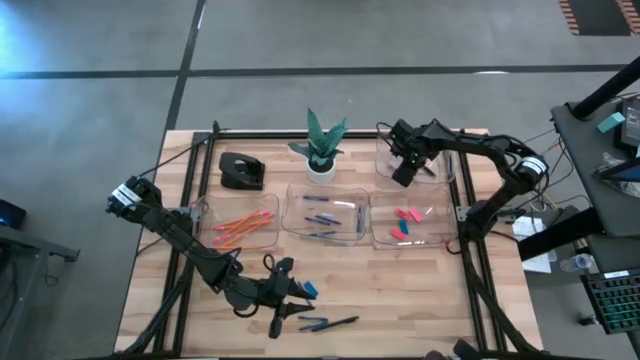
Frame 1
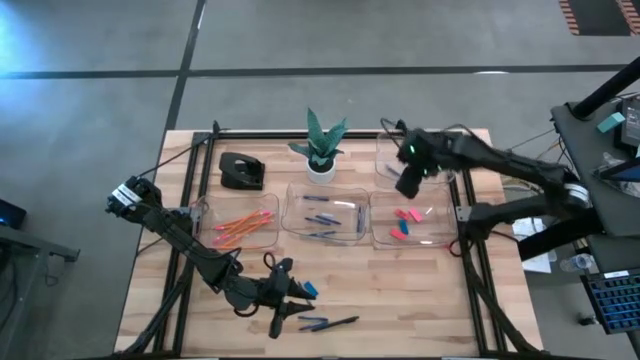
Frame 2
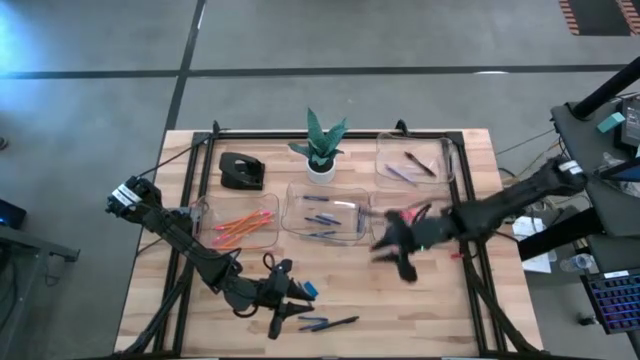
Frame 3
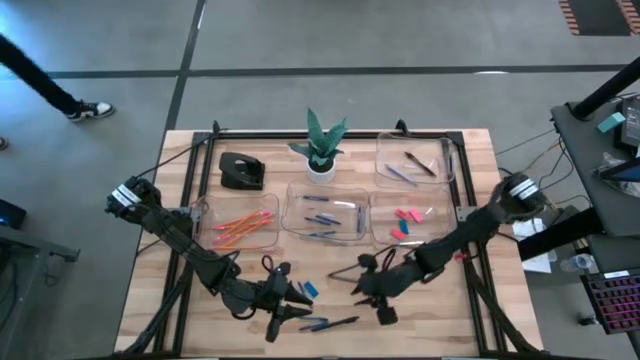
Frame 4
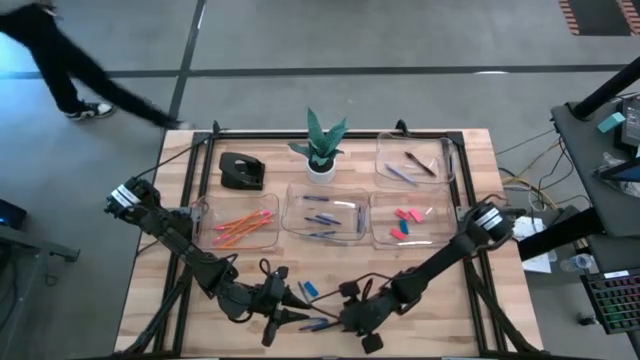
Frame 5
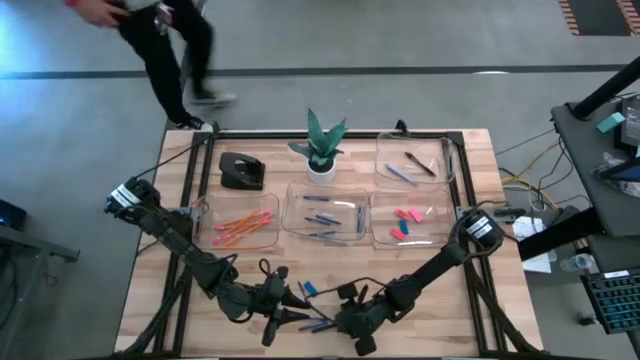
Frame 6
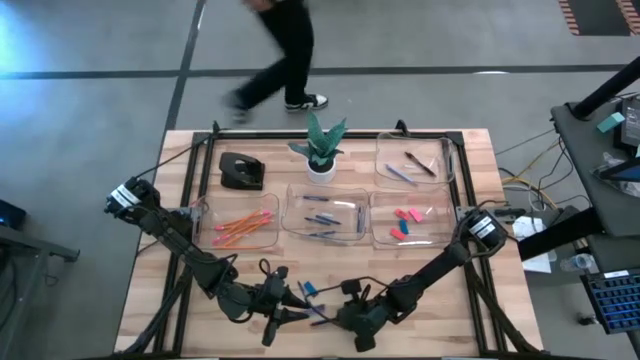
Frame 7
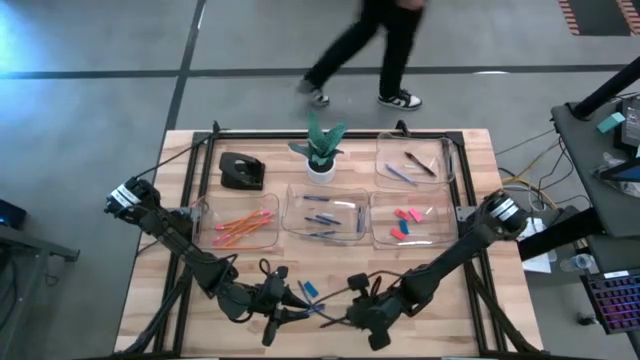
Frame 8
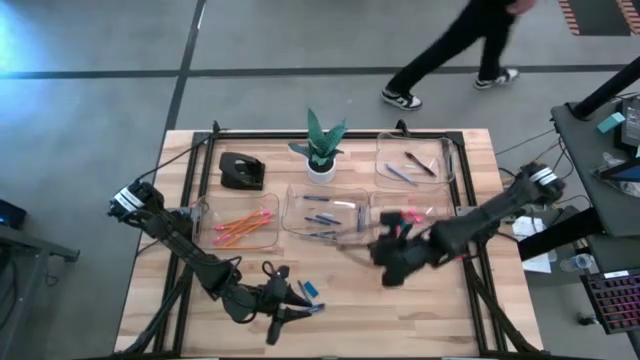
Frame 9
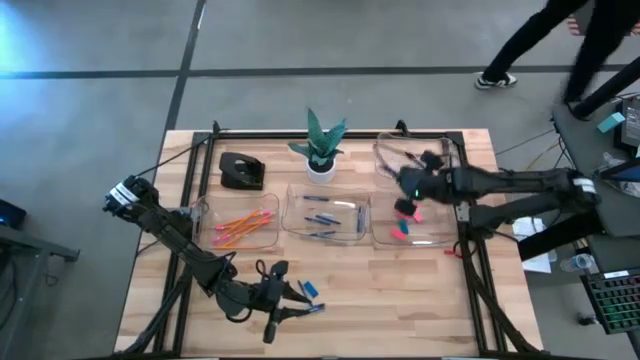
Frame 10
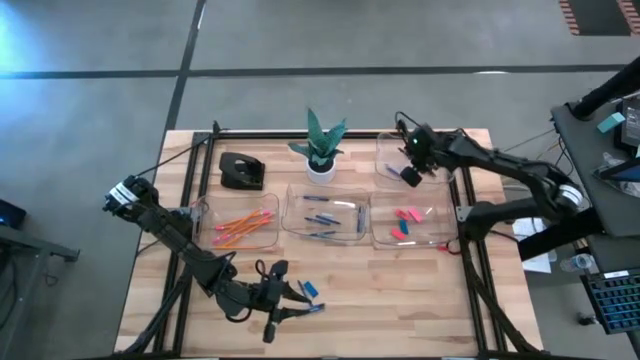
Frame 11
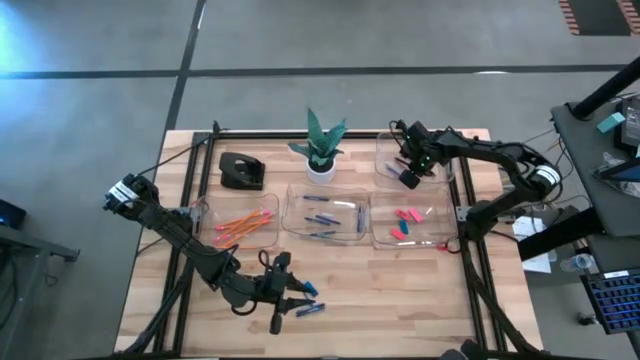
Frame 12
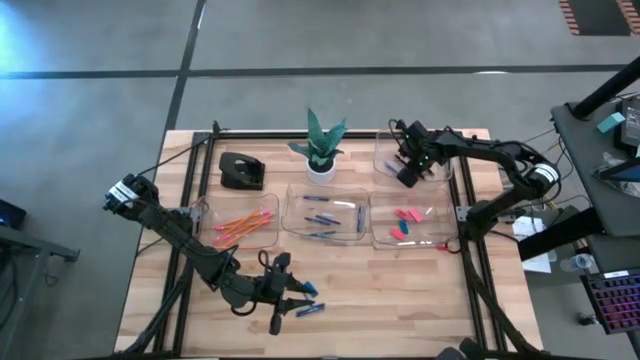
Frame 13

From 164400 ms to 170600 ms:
Task: Sort crayons/erasers/pens/pencils in bins
Put the black pen into the top right transparent bin

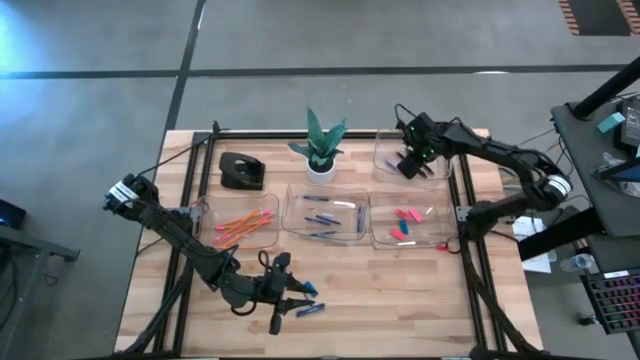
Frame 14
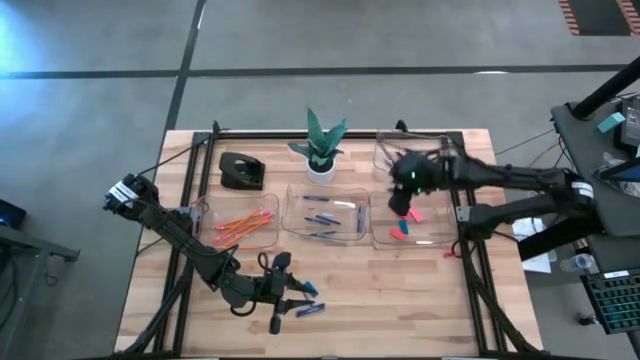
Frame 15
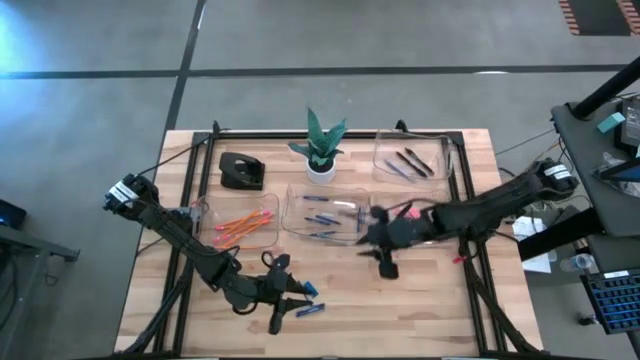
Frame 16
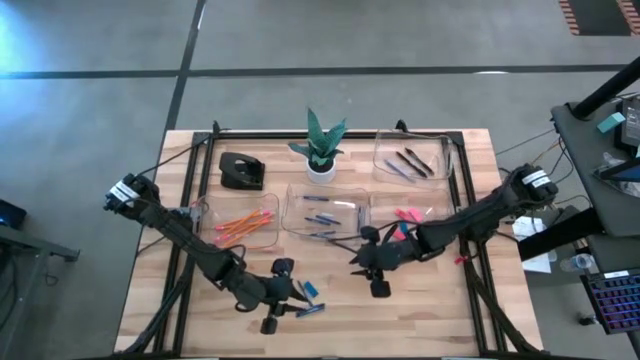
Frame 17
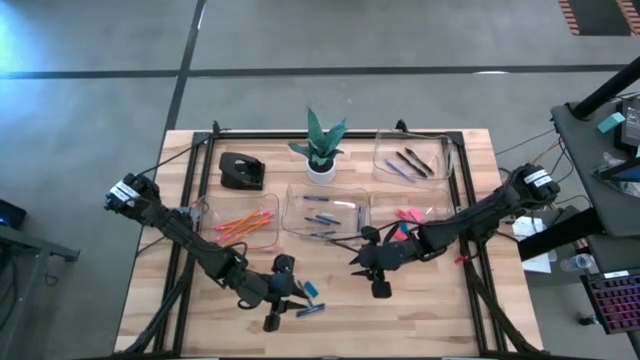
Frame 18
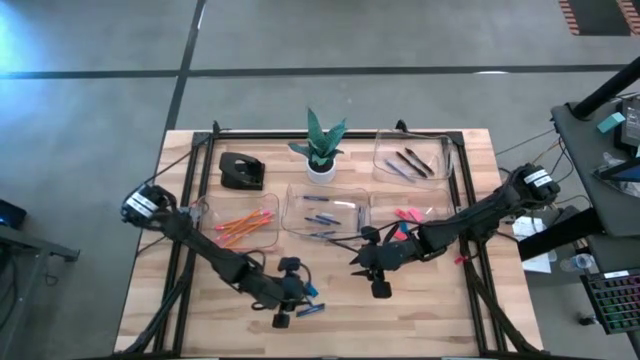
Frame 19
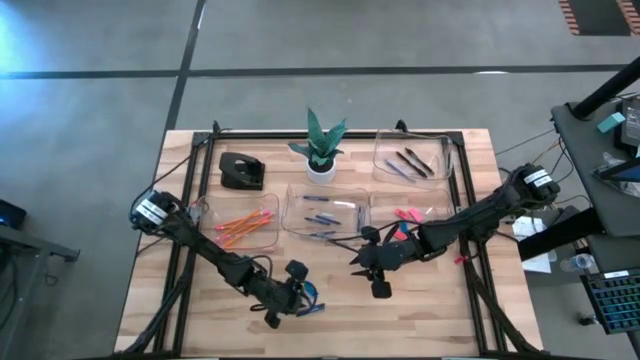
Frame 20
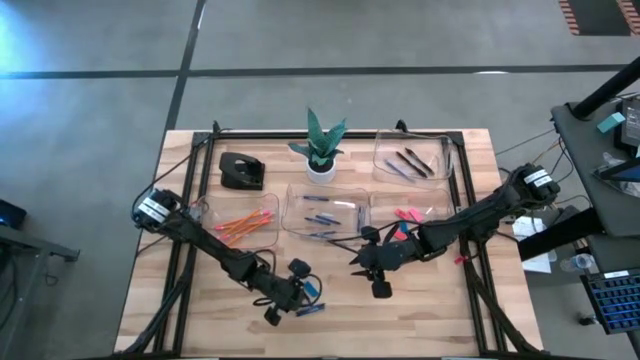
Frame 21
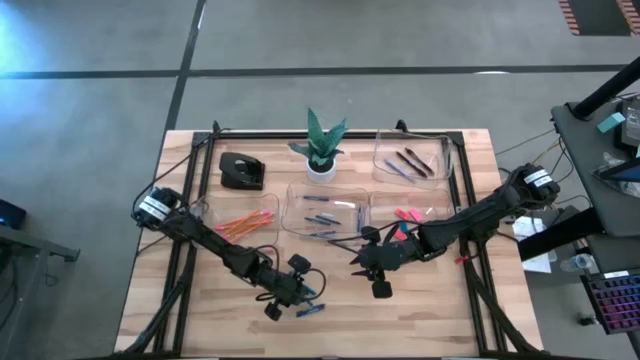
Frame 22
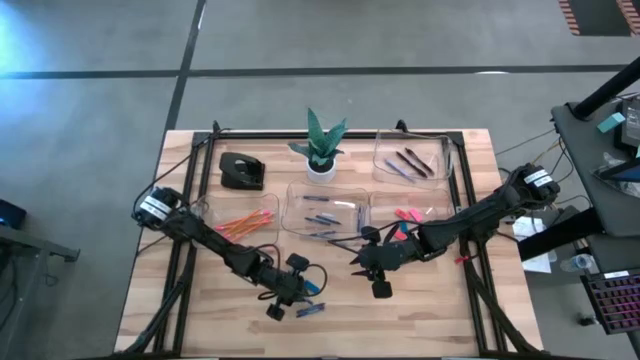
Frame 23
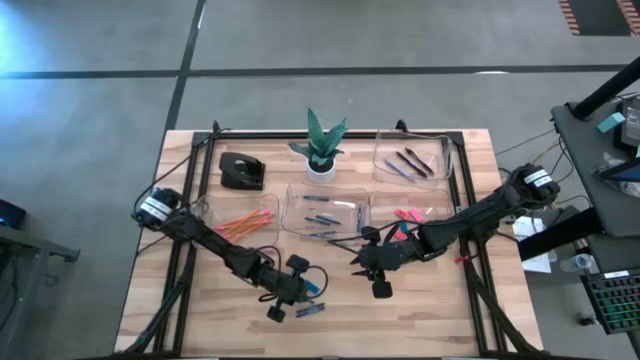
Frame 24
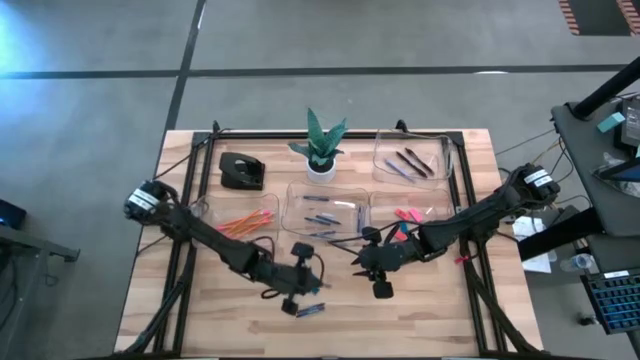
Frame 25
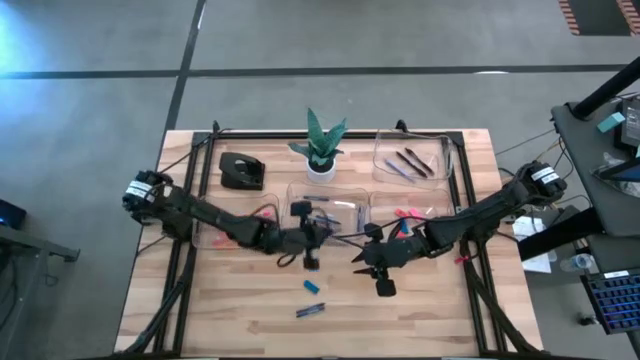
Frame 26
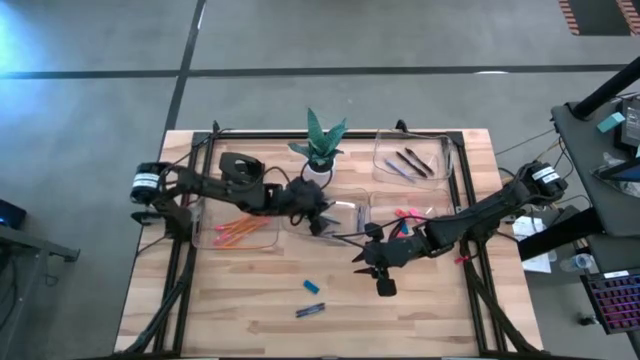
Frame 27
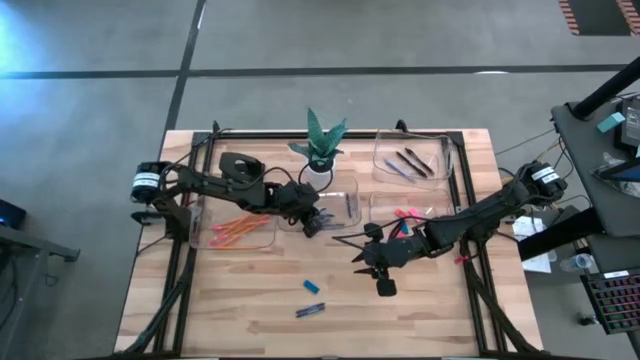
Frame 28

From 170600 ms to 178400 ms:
Put the blue crayon into the middle transparent bin

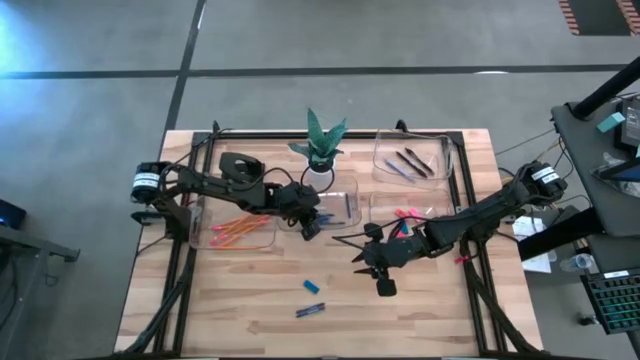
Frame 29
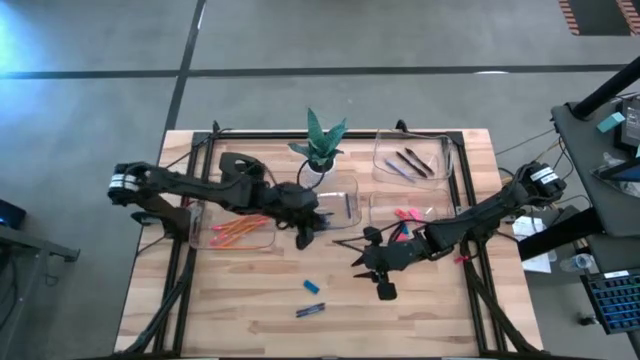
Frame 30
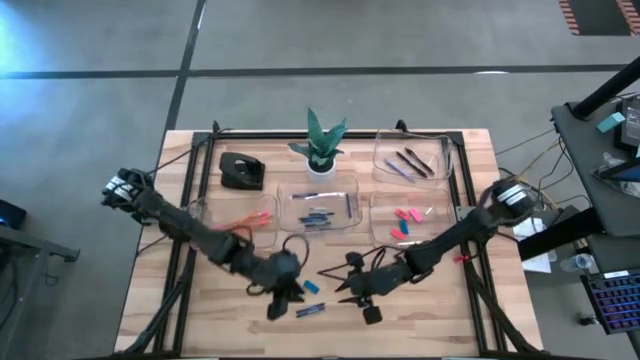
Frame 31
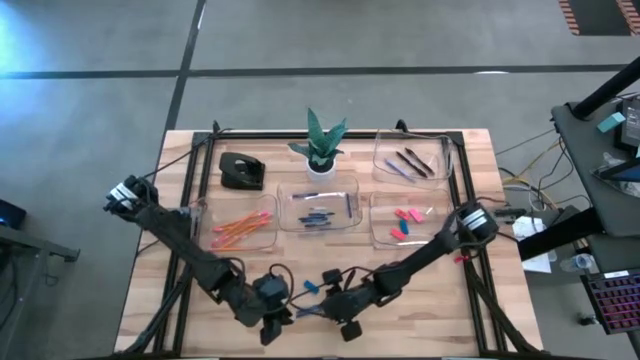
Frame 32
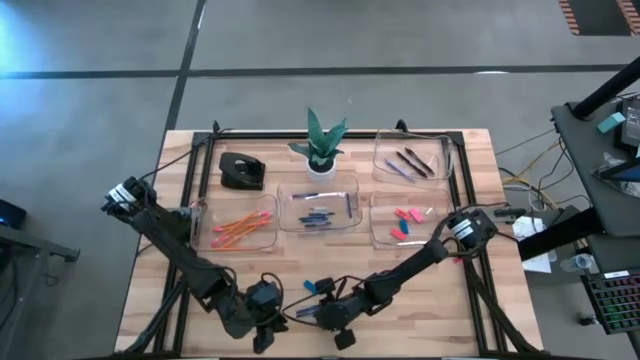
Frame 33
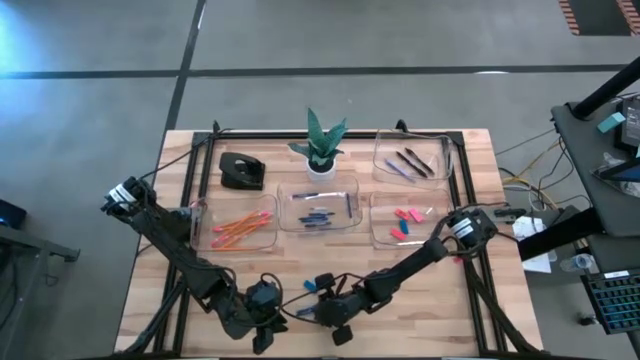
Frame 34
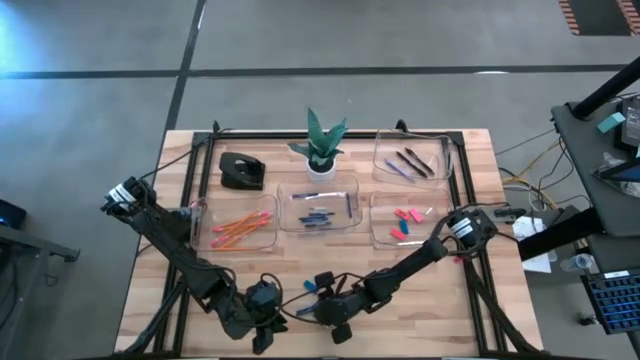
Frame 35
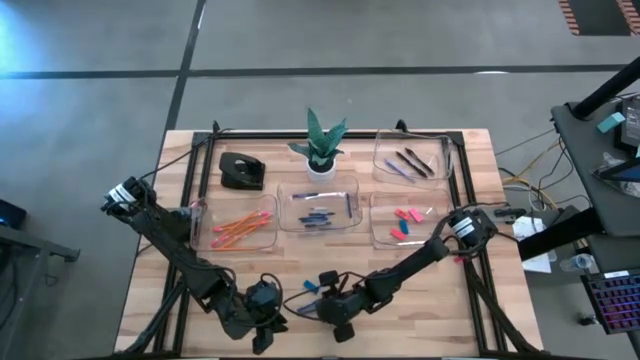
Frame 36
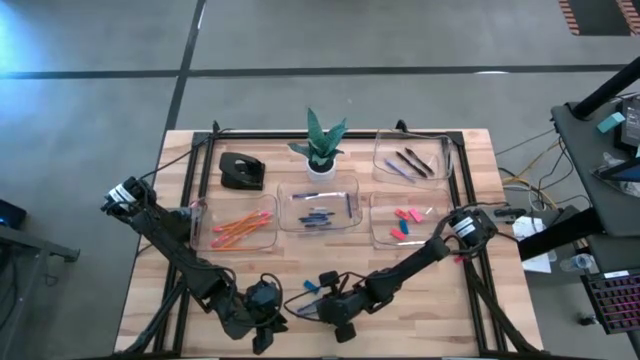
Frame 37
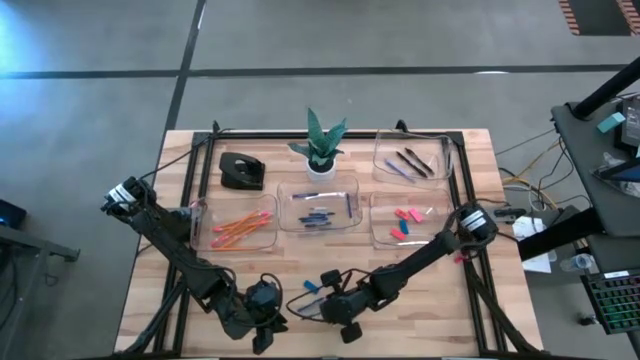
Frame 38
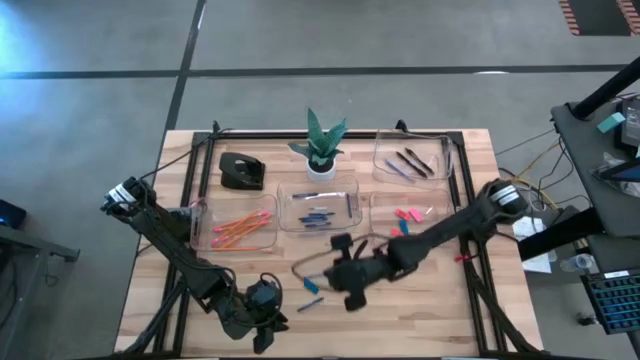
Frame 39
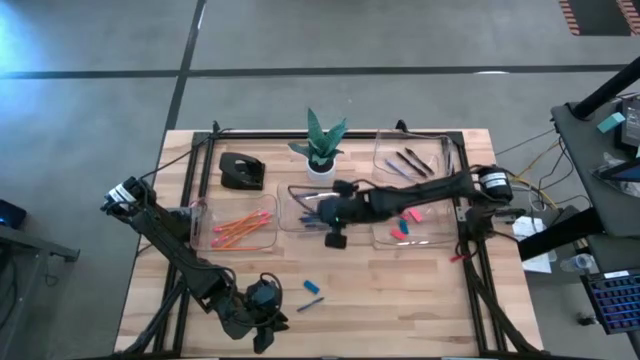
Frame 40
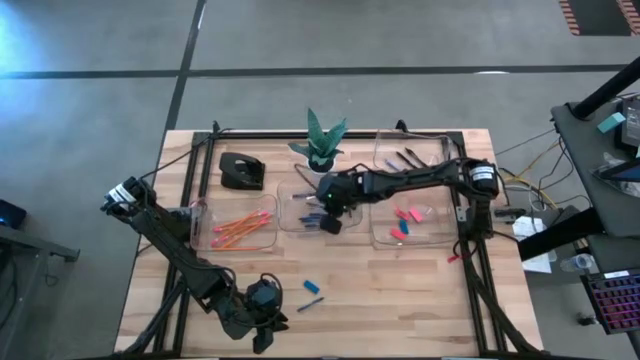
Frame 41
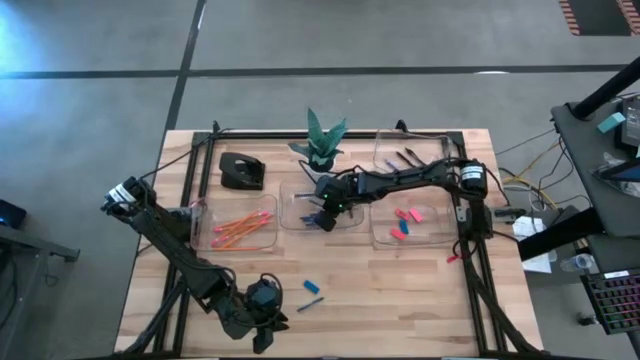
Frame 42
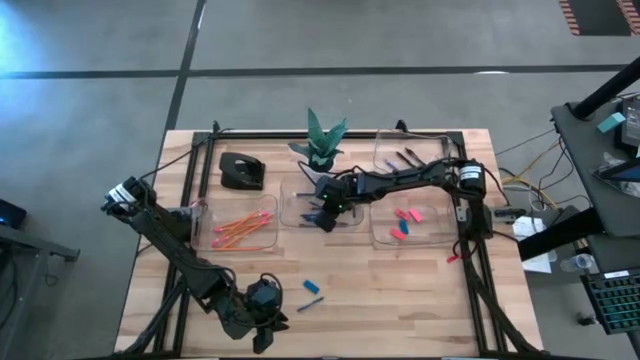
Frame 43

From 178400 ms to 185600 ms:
Put the blue crayon into the middle transparent bin
